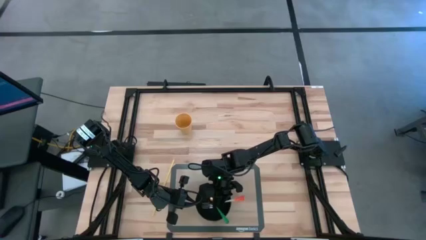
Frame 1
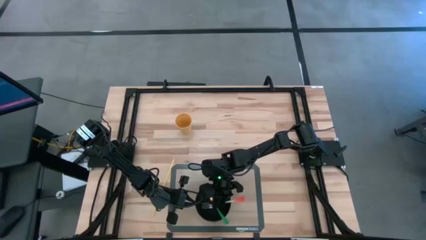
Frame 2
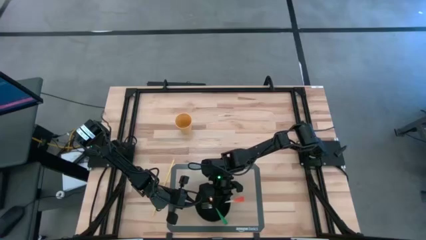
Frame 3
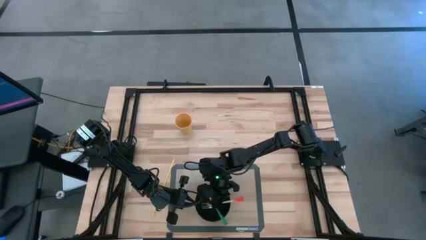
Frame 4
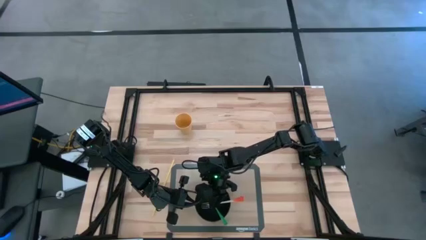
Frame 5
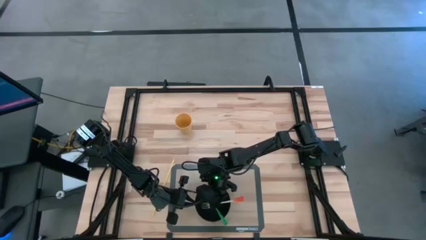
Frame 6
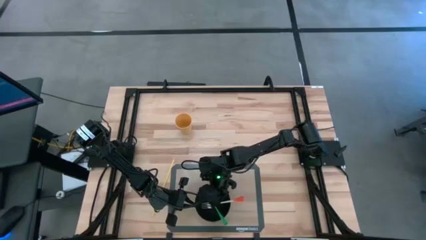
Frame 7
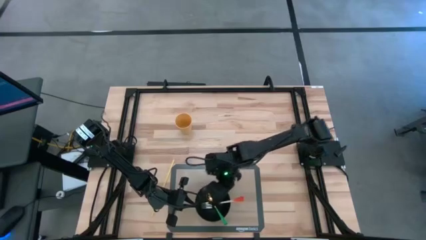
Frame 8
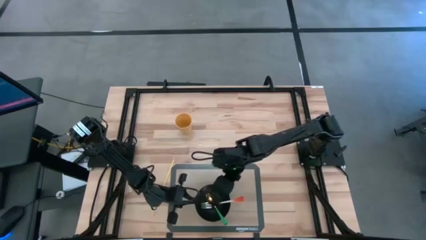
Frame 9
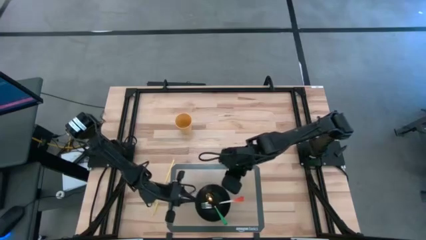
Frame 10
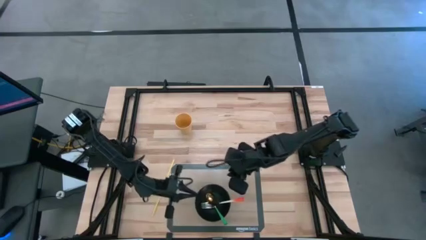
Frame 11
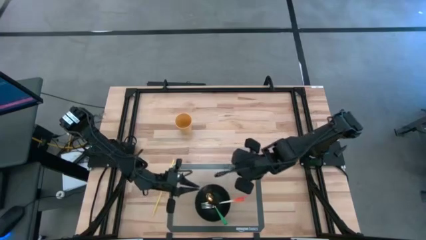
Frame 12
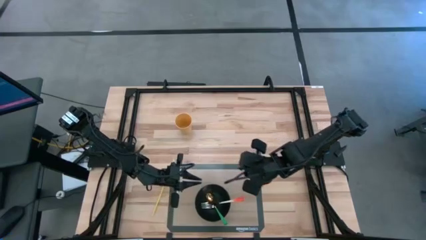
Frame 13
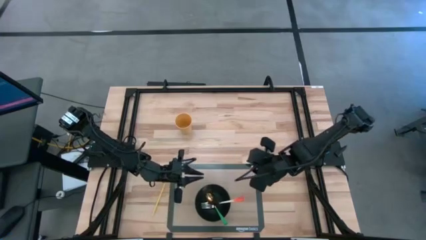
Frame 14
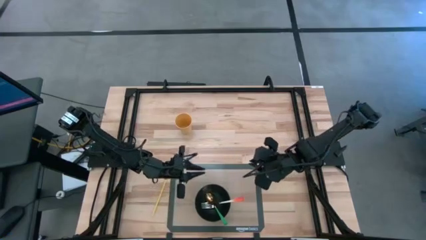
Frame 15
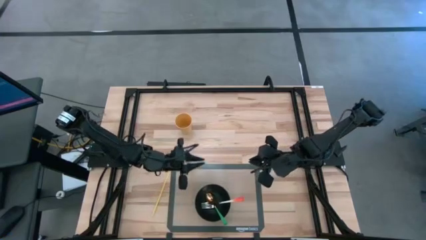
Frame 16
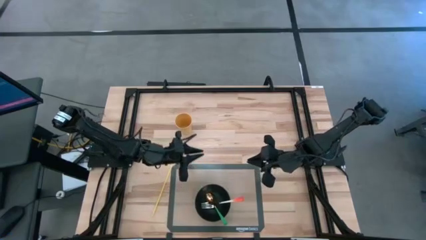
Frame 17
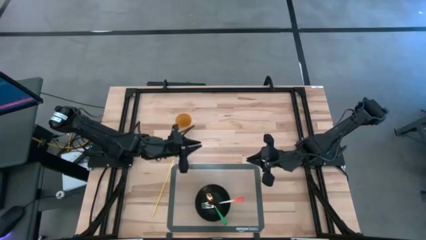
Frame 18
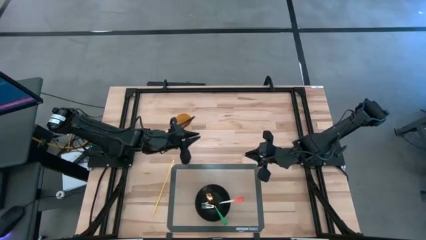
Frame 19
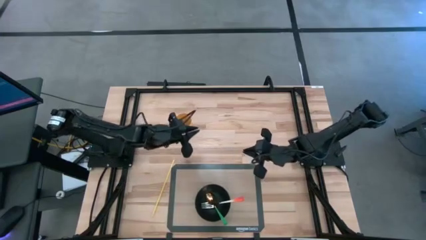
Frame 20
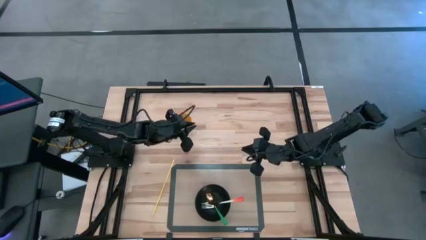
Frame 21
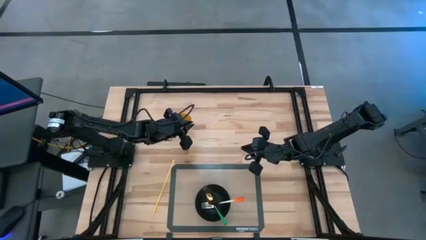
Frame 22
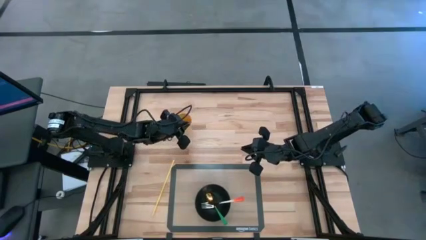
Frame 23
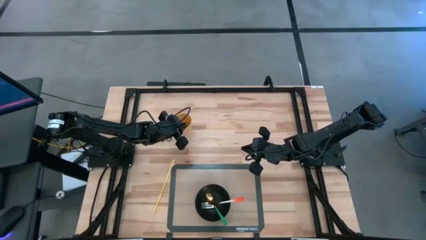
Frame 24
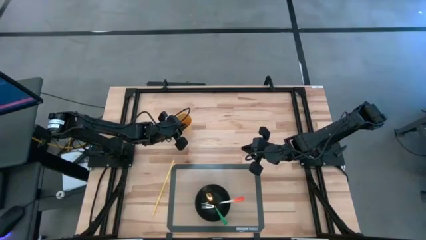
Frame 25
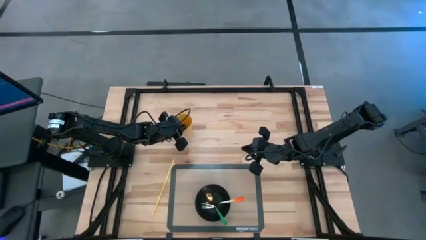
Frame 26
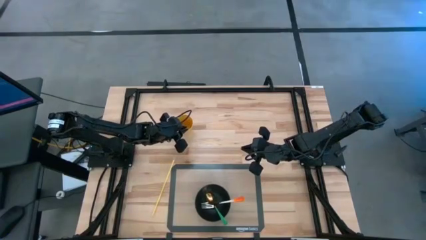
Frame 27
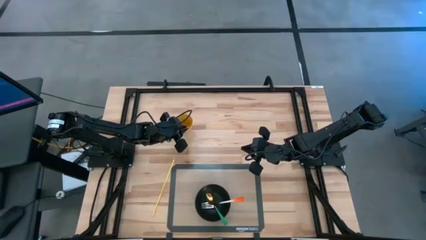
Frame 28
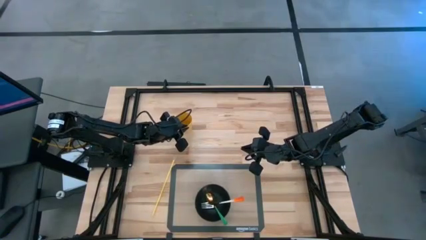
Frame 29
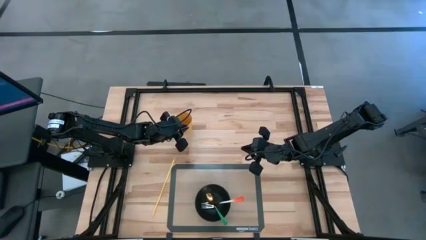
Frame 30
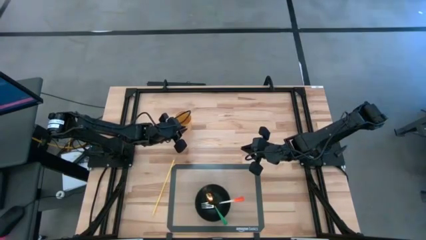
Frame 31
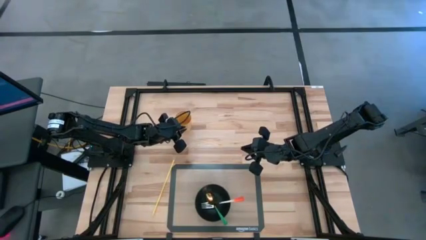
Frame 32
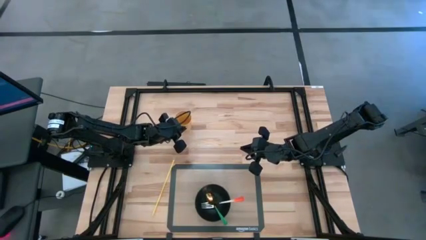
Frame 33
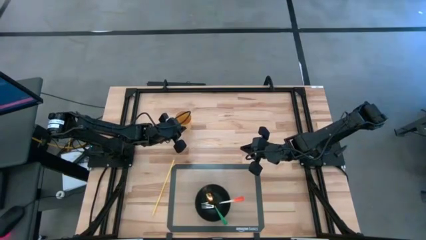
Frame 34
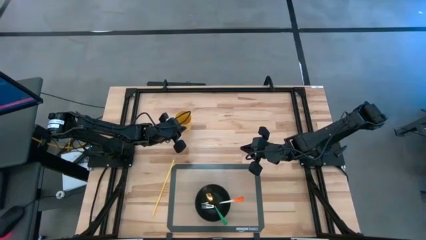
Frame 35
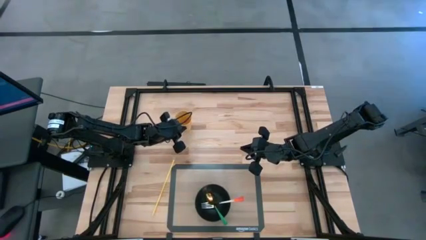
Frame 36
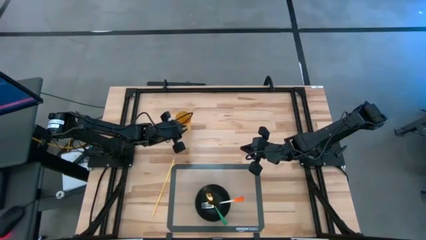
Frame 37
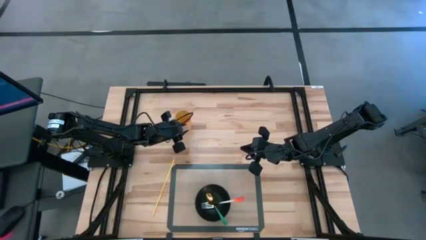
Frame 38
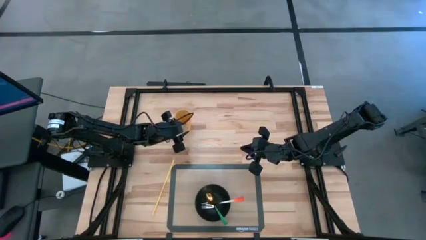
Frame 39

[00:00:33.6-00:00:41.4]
Task: Pick & Place Utensil
Put the yellow cup on the top left of the black bowl on the transparent mat

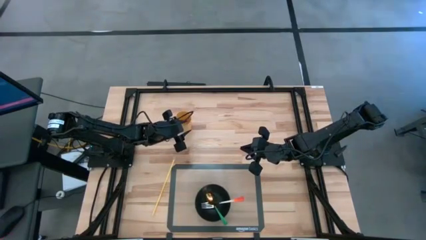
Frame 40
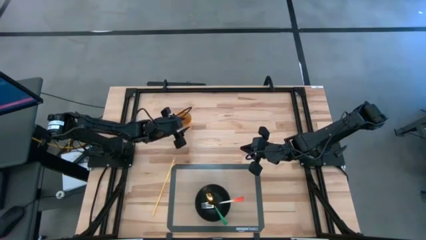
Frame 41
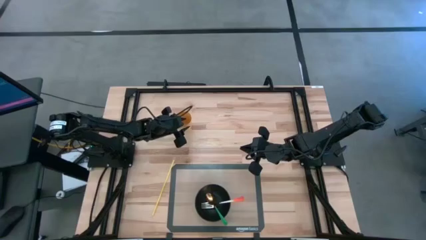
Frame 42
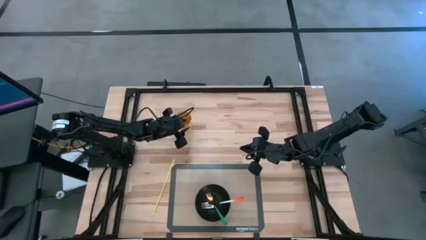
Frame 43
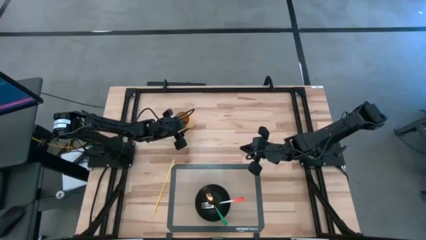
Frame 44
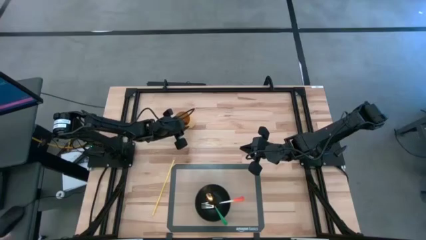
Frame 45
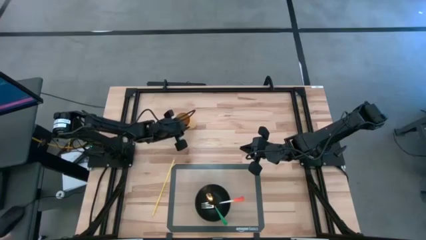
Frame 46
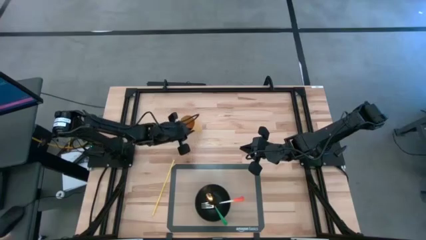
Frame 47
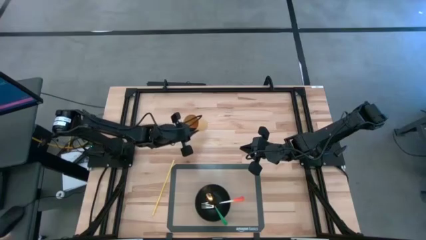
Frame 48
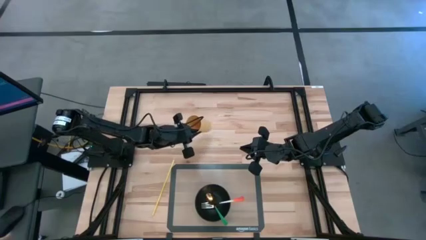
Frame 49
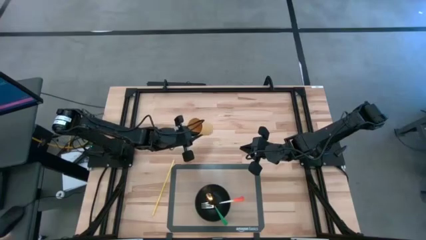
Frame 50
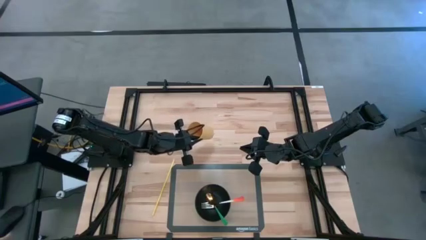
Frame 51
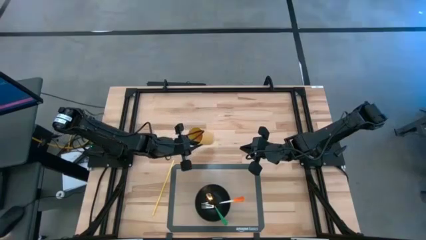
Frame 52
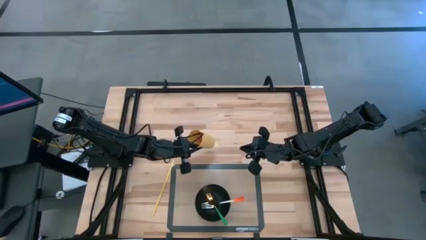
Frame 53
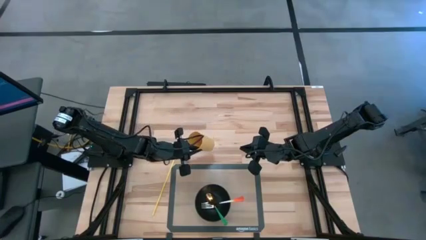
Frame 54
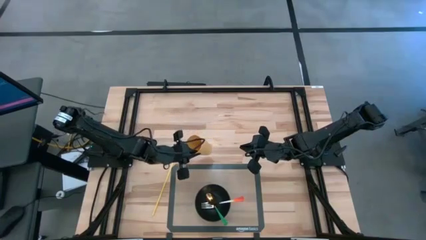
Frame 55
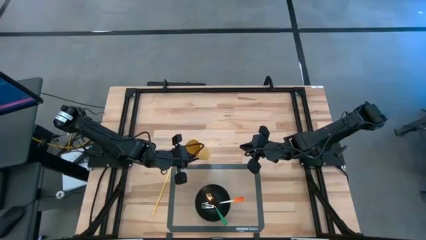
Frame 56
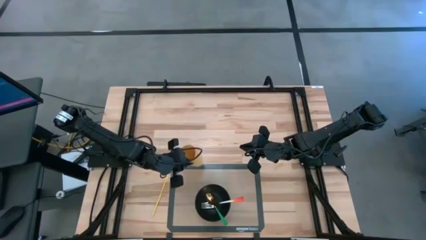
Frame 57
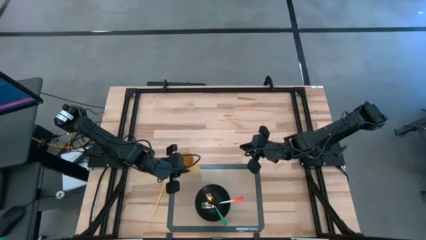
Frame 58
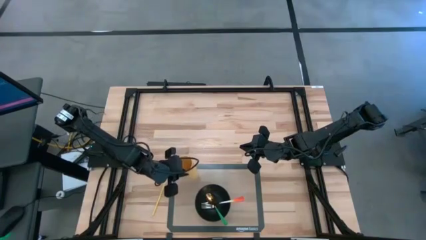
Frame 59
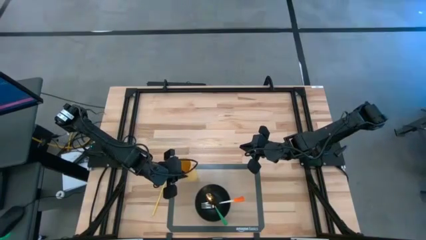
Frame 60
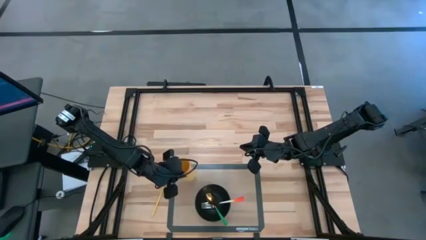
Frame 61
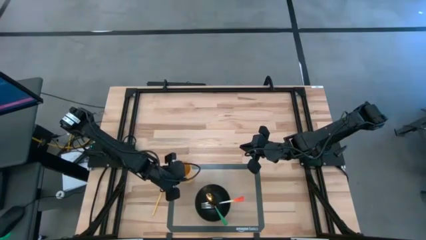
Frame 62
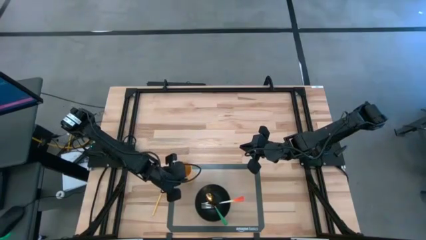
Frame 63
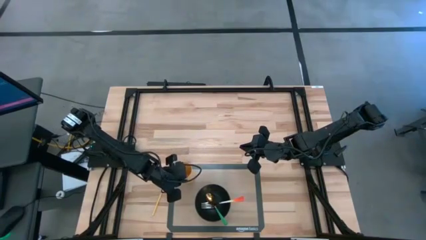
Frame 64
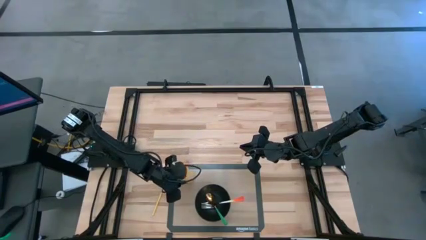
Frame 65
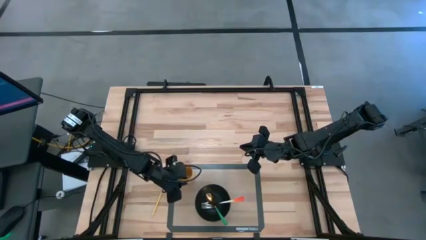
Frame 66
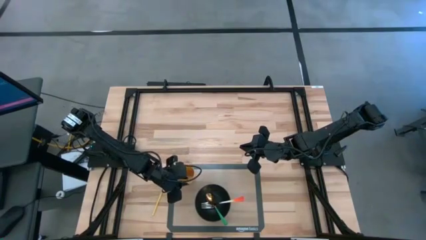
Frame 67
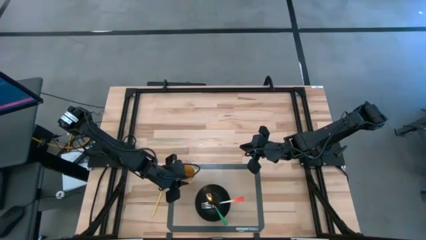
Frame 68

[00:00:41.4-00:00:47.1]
Put the yellow cup on the top left of the black bowl on the transparent mat
